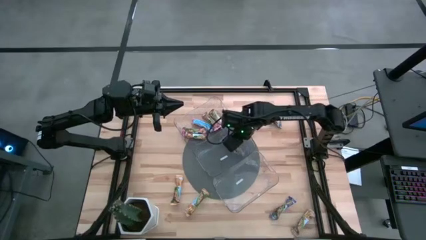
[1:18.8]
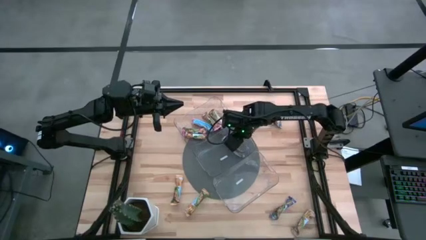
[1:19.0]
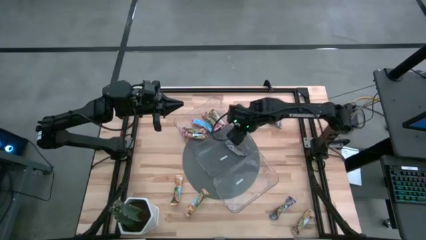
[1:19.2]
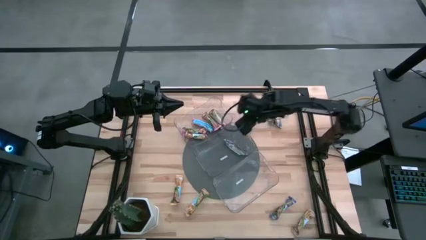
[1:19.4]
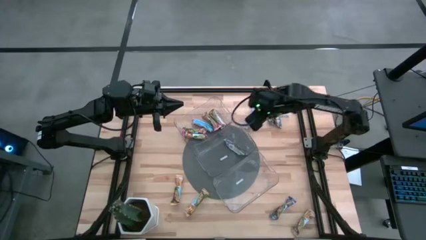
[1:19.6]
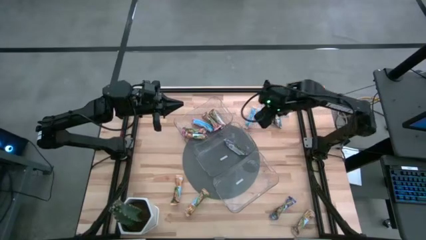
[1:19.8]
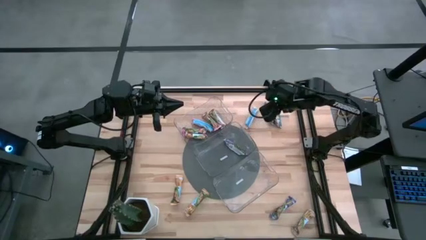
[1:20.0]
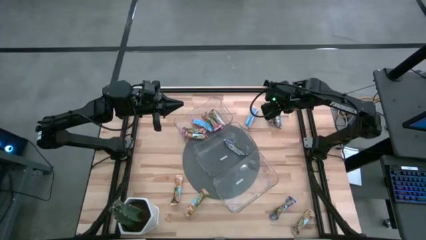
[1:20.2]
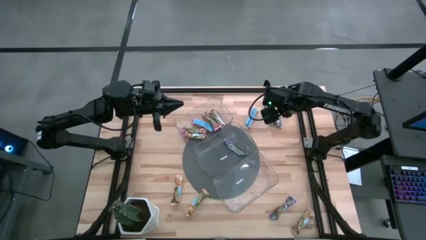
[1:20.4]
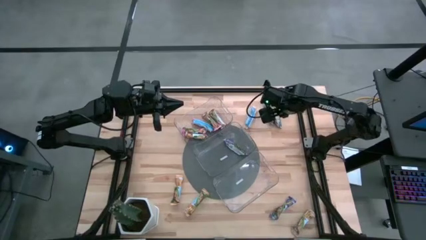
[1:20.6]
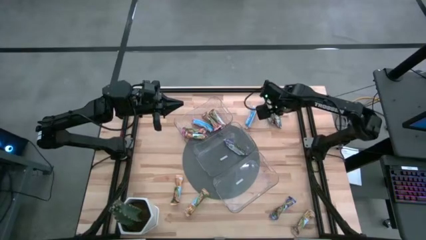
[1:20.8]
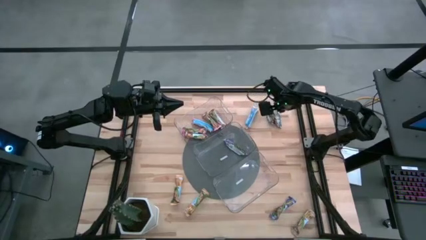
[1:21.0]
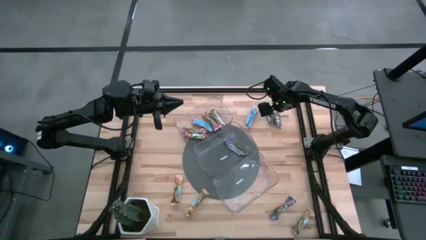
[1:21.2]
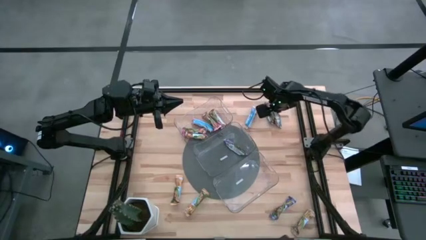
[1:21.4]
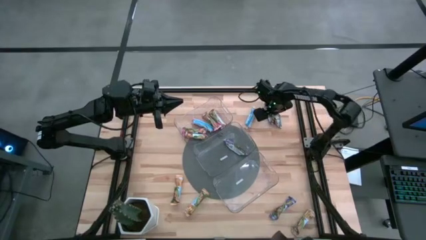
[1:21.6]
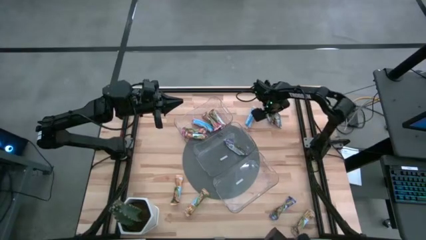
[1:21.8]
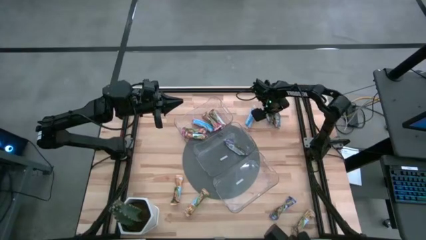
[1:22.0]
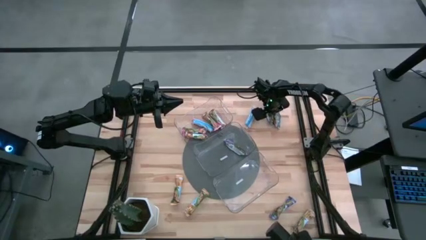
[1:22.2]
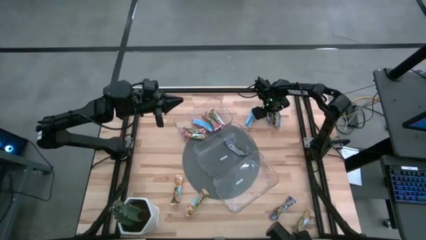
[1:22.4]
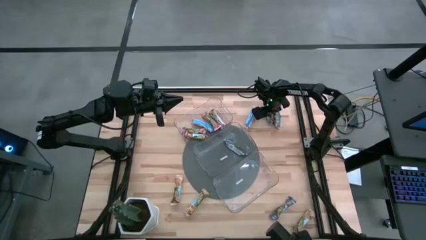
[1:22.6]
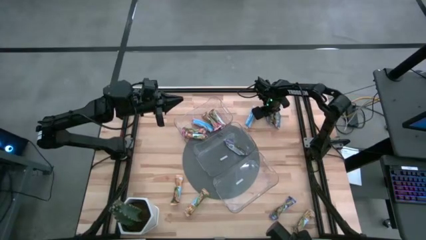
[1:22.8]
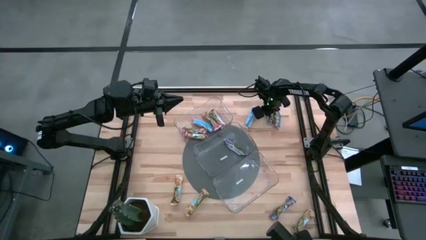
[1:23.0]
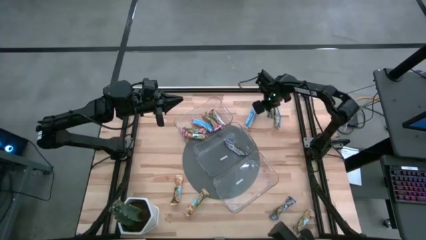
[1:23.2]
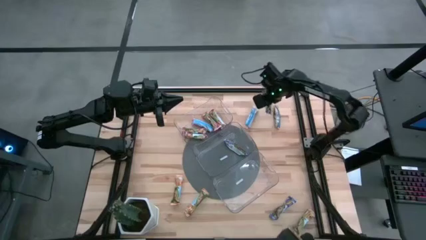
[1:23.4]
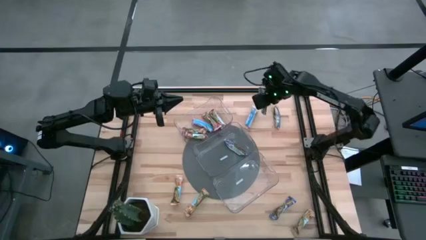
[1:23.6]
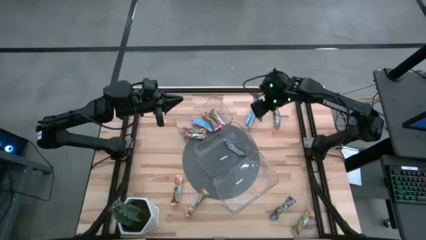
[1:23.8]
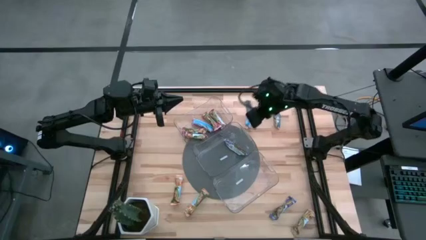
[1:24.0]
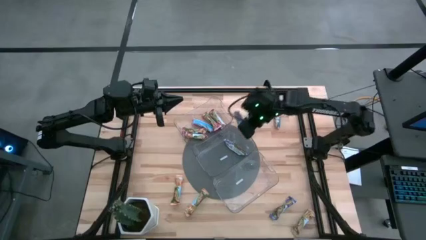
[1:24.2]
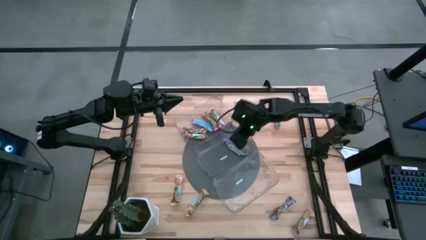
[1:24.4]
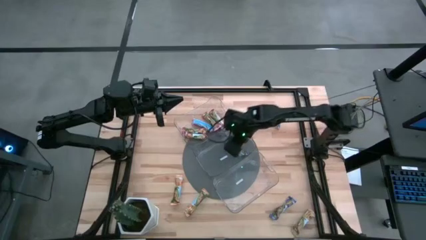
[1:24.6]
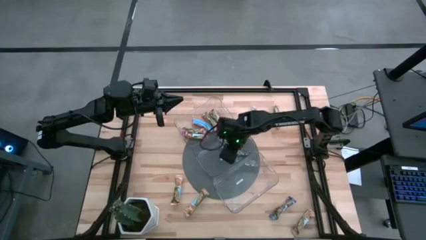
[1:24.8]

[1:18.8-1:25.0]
Task: Pick and place Granola Bars by type
Put the blue granola bar into the middle transparent bin

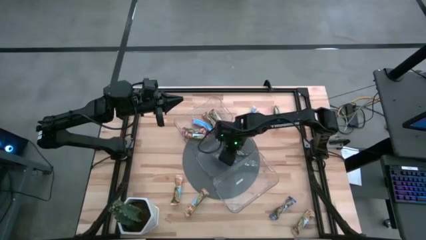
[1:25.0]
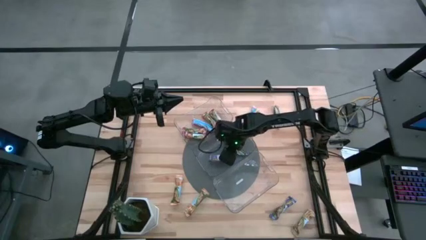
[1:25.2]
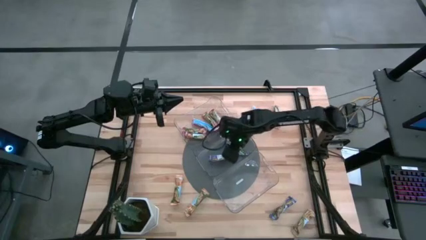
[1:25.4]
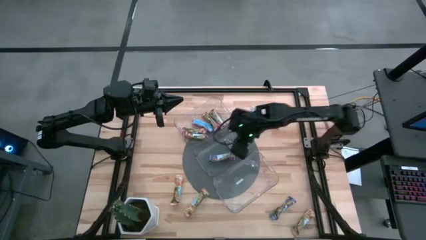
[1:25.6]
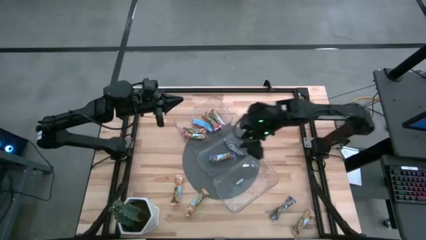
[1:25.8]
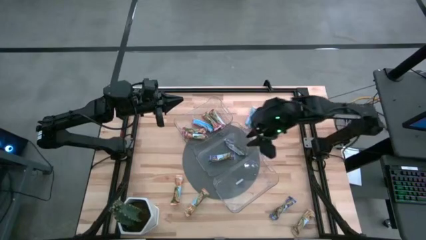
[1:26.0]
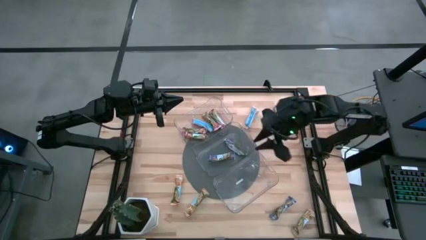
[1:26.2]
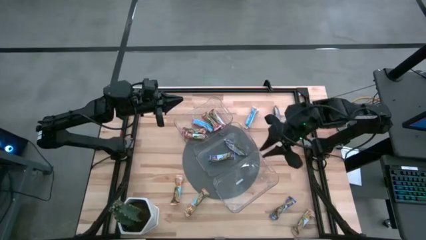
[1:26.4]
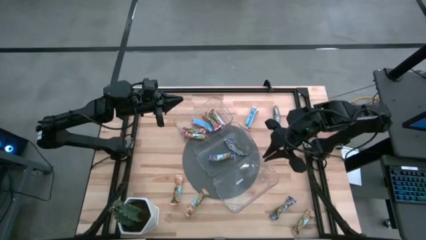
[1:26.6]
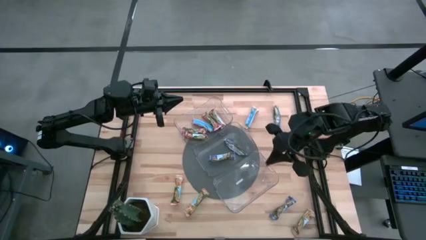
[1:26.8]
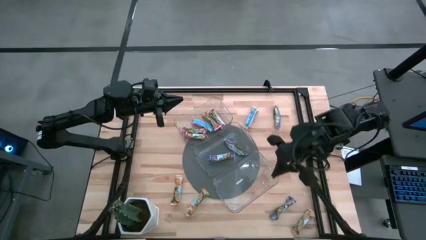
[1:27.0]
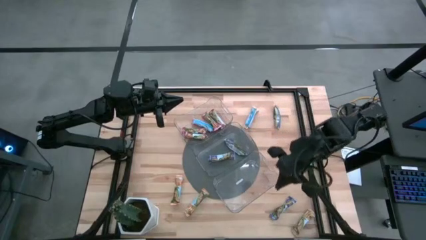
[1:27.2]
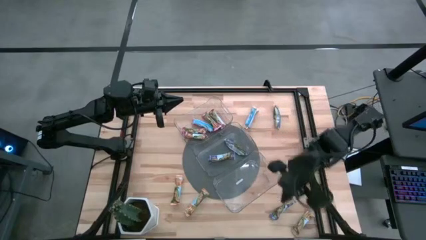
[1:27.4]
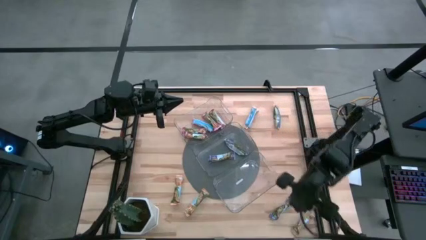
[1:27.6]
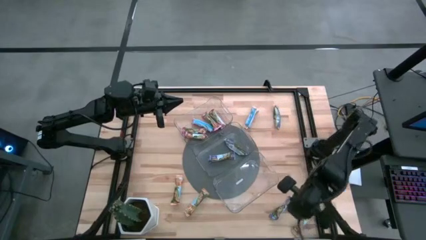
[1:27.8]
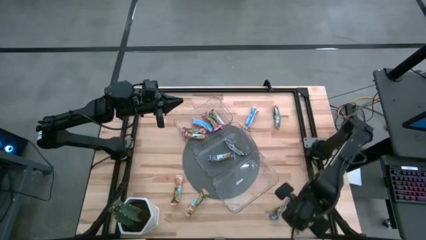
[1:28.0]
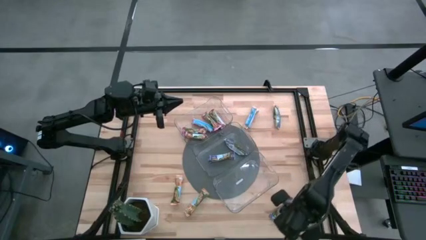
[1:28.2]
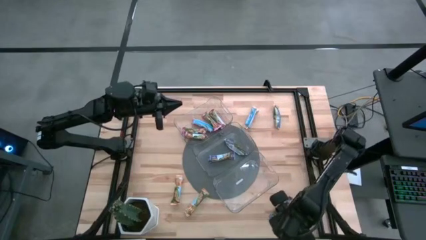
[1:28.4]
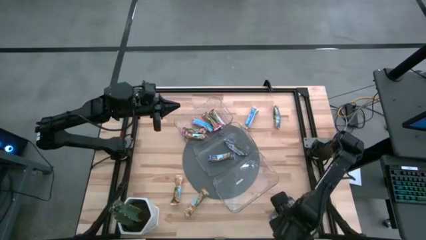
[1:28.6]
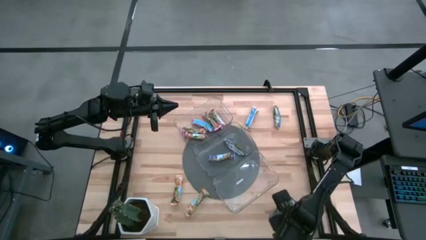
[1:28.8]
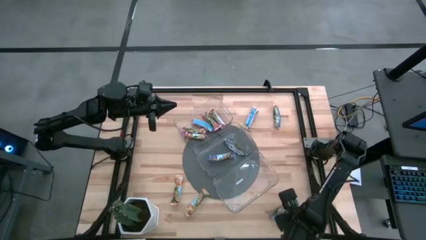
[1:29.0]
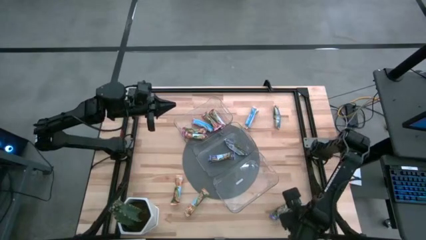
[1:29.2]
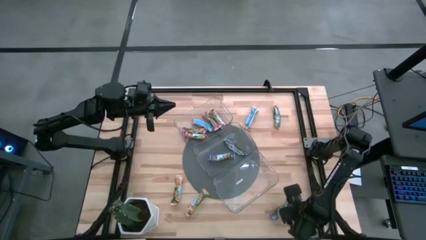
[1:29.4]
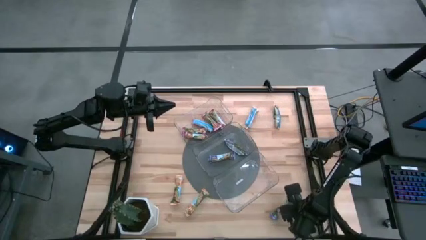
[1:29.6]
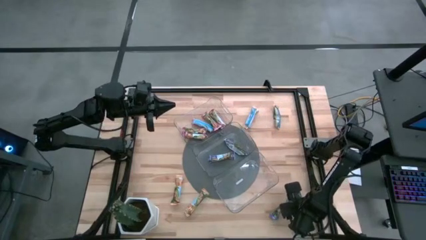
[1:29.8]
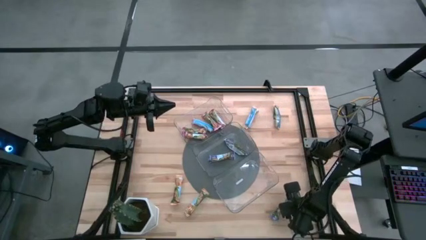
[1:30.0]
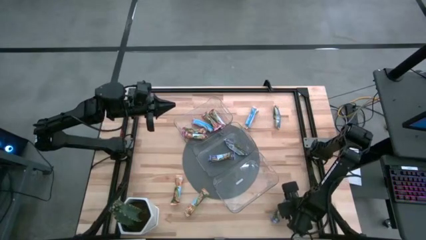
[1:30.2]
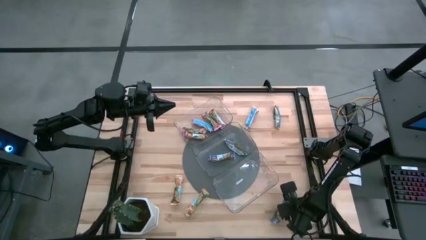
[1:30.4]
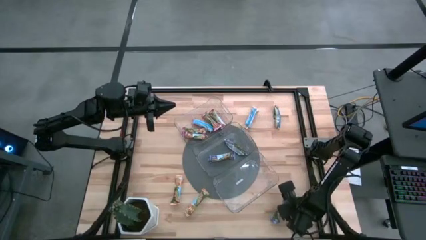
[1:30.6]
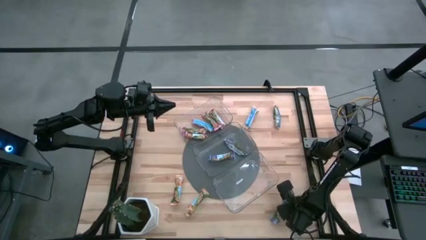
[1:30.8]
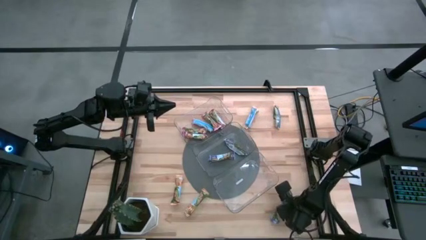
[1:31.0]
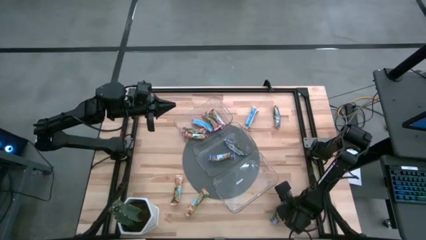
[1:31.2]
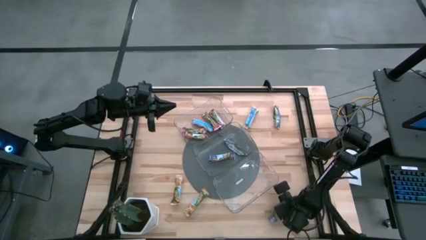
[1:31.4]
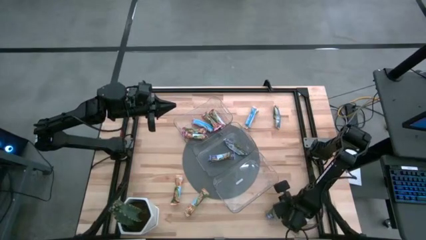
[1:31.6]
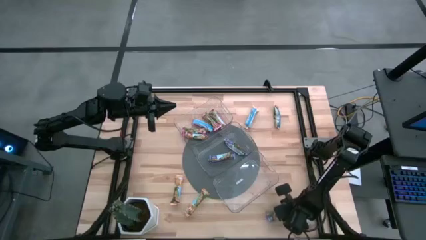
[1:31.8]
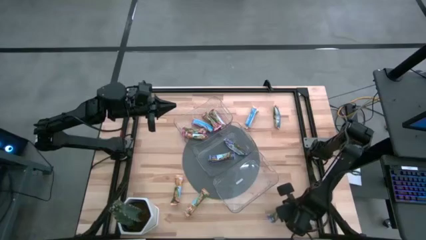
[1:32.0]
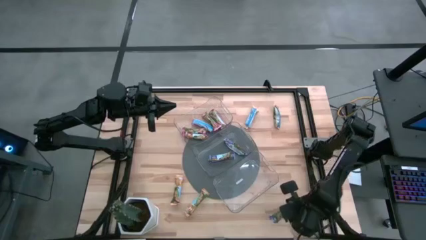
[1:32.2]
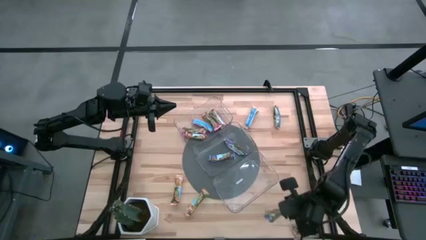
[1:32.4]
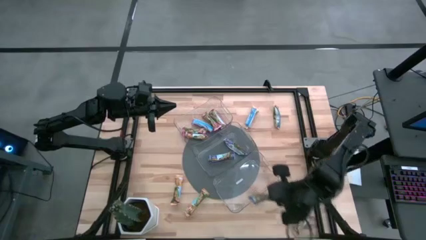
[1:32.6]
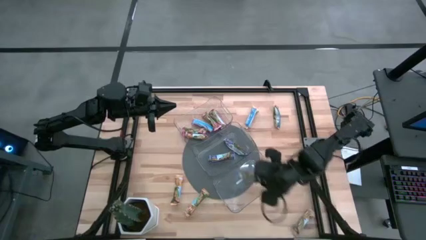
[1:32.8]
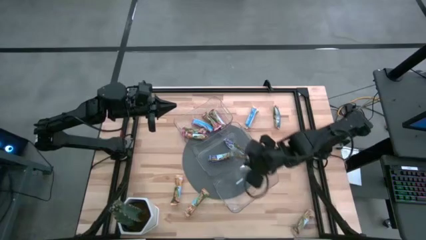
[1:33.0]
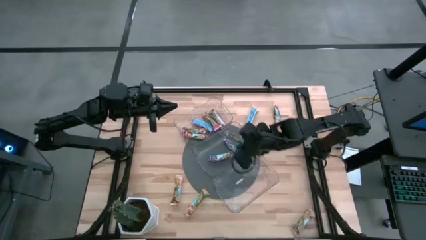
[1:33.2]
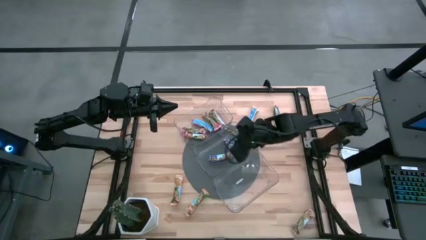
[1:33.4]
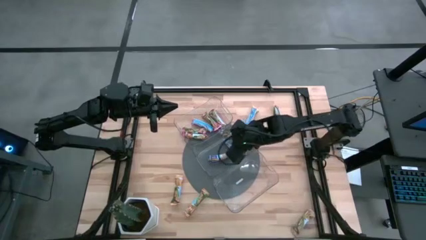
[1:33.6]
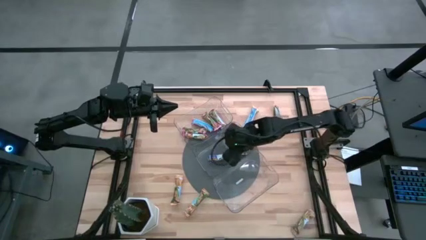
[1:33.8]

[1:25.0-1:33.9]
Put the blue granola bar into the middle transparent bin
